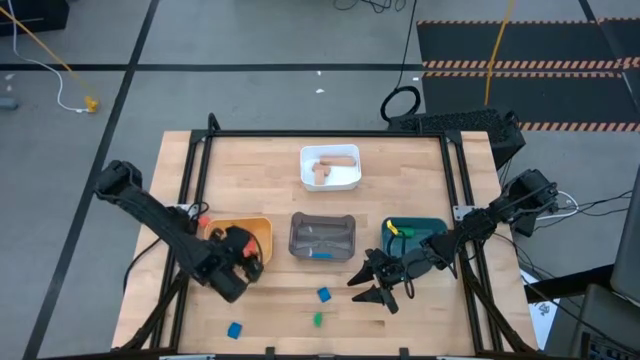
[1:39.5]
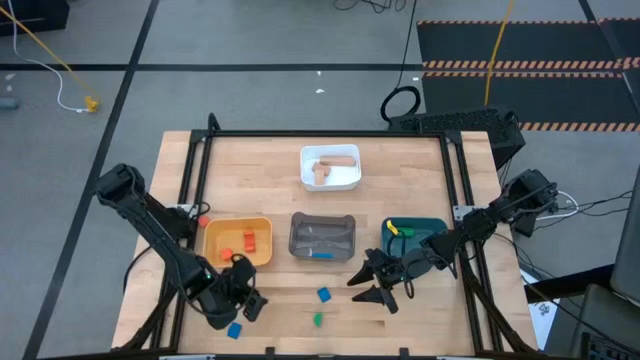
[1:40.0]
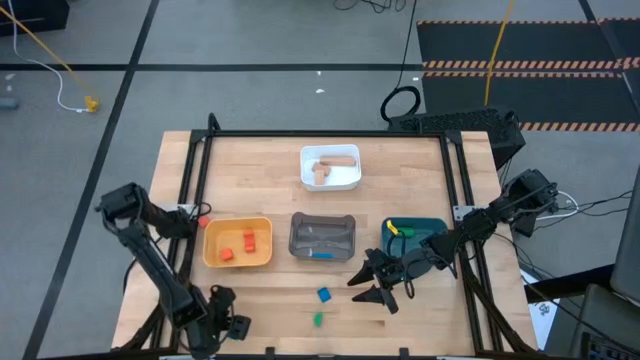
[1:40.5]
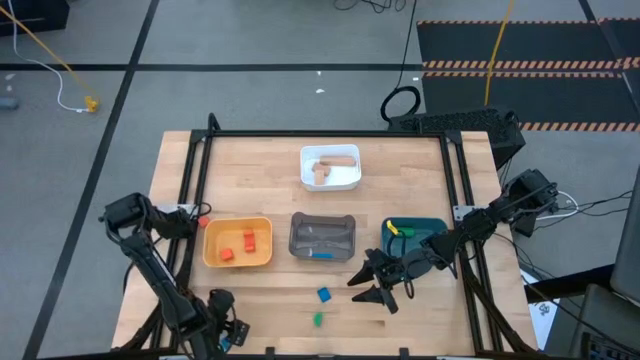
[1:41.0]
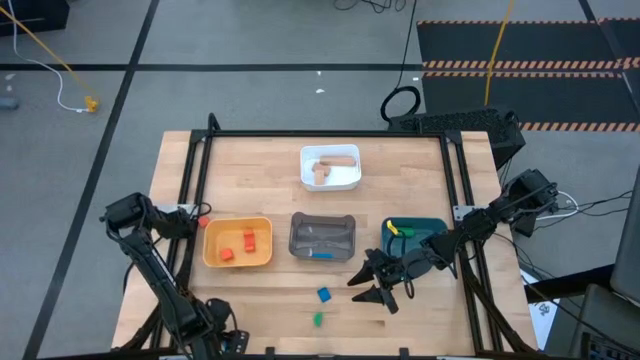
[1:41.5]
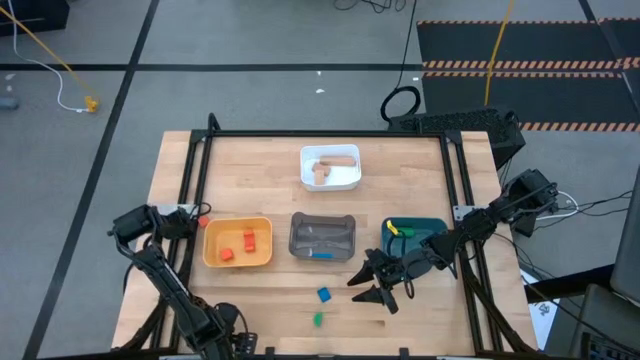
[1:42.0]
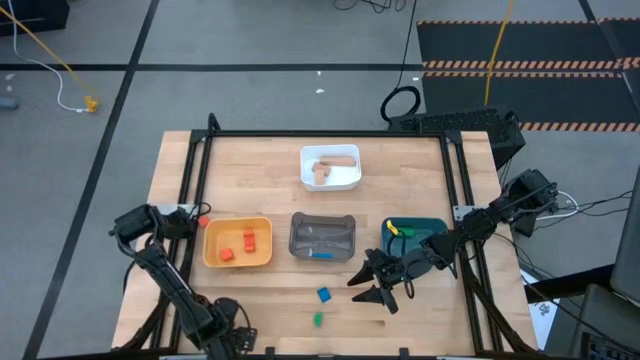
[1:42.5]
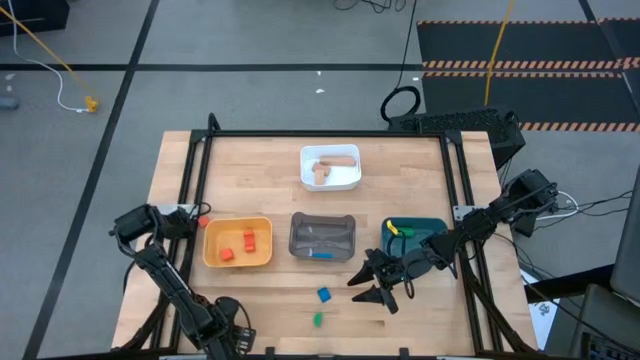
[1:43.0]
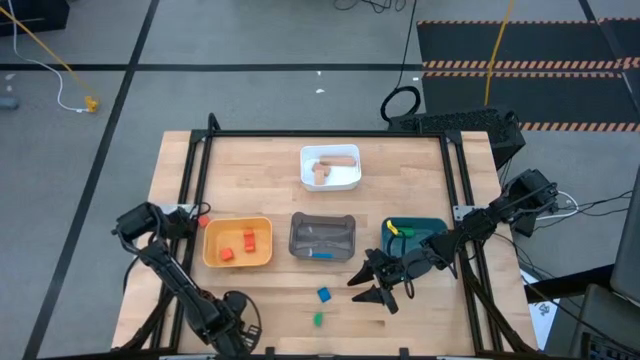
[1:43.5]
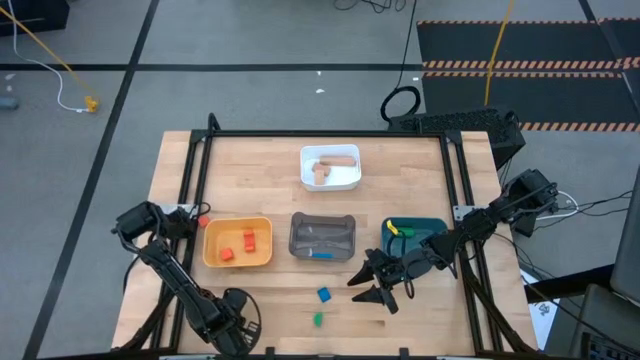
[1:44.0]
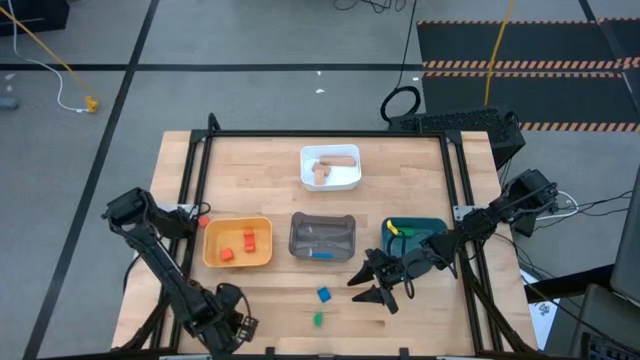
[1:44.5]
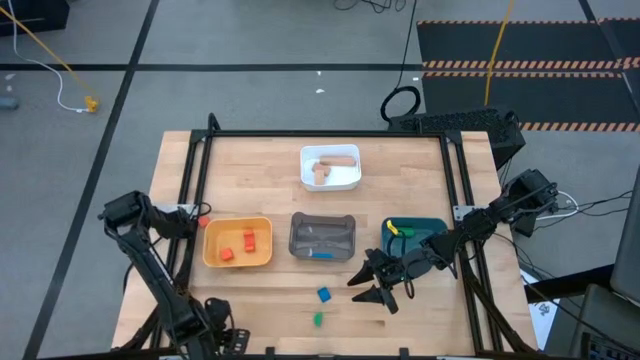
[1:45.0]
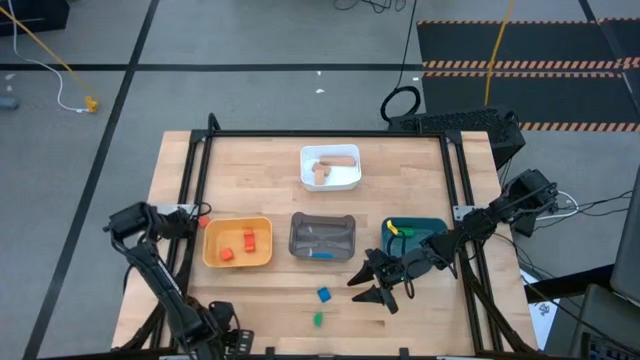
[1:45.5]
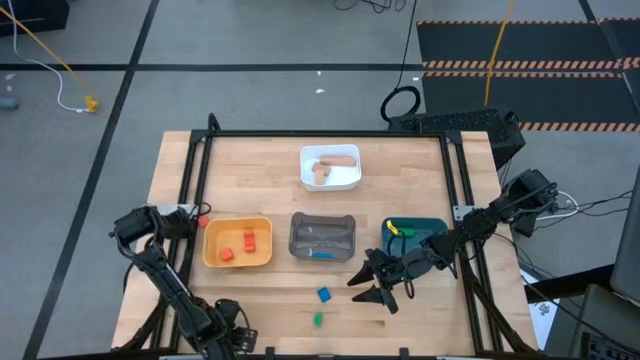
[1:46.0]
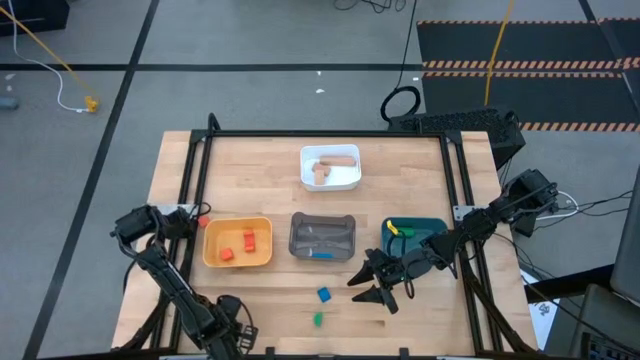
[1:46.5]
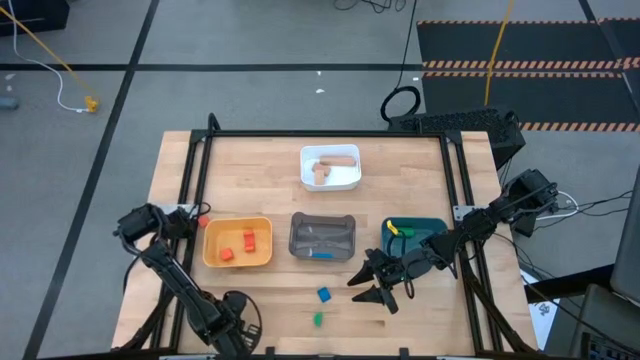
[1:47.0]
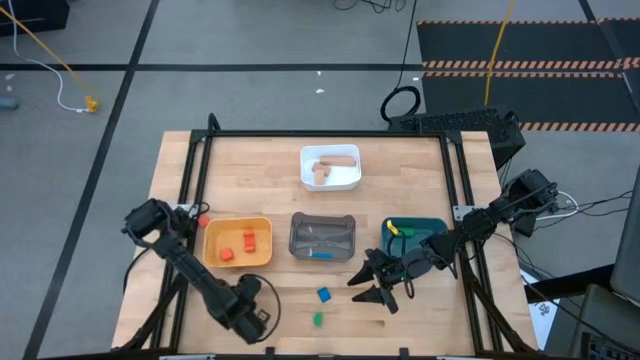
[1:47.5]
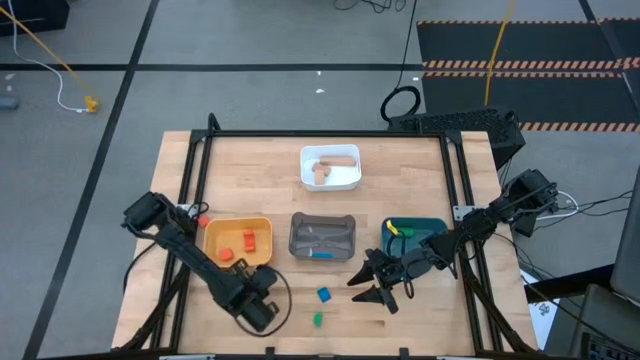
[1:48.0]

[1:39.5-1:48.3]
Task: Sort & place blocks by color
Put the left blue triangular block into the black bin

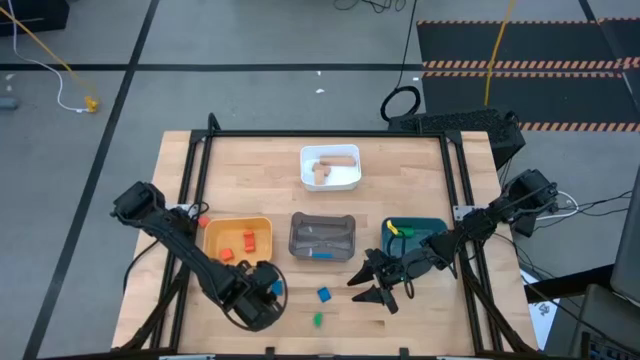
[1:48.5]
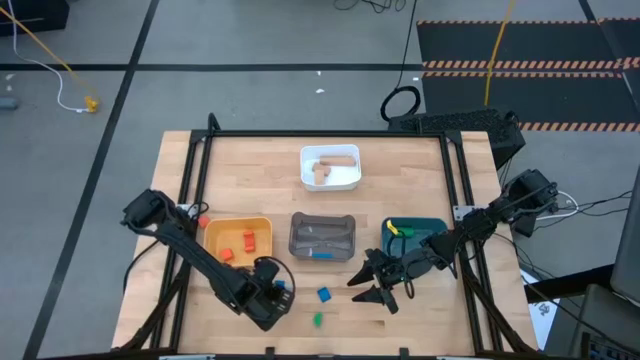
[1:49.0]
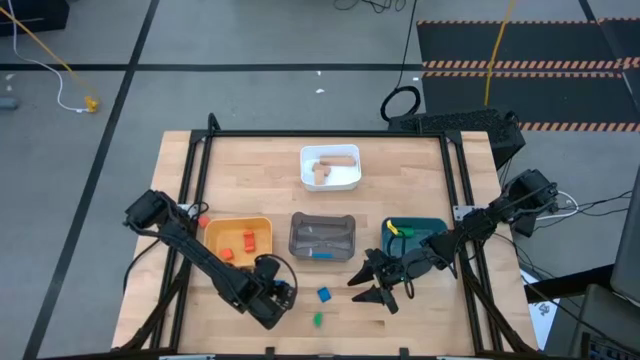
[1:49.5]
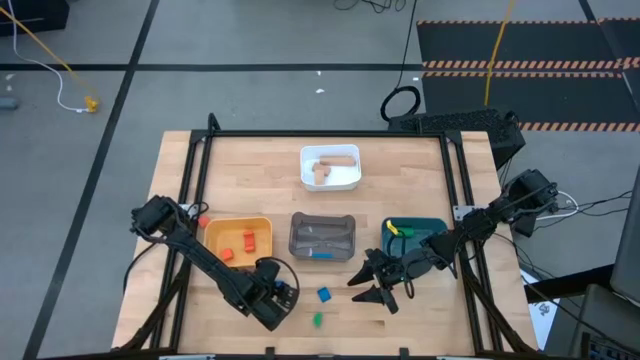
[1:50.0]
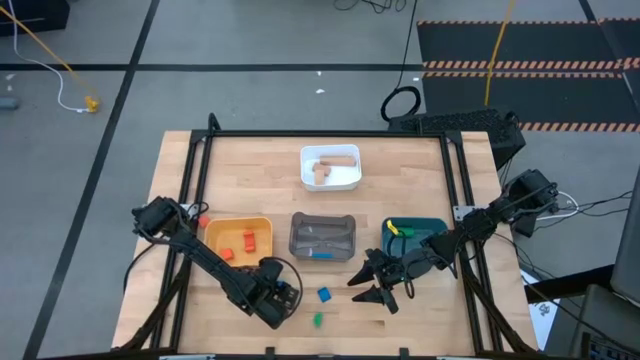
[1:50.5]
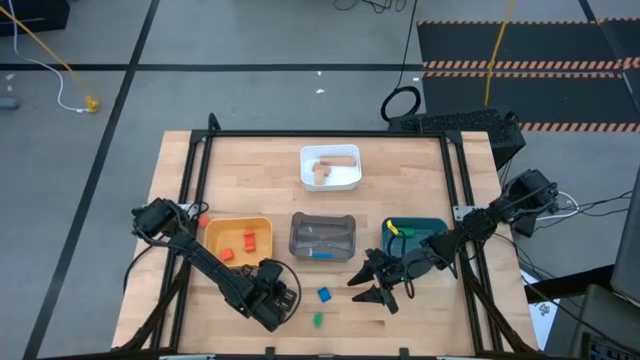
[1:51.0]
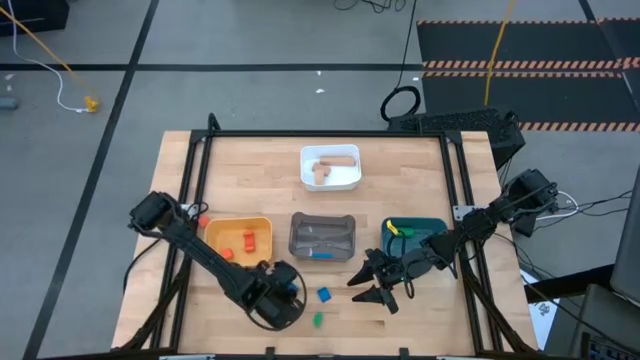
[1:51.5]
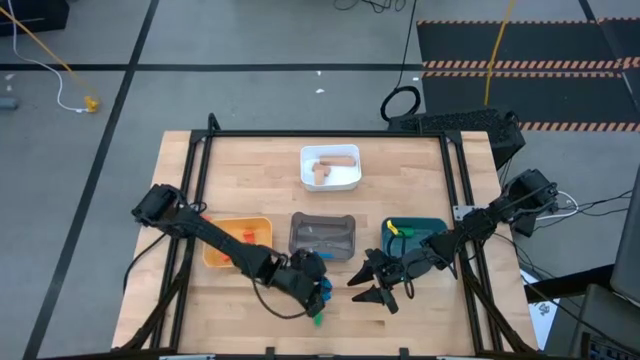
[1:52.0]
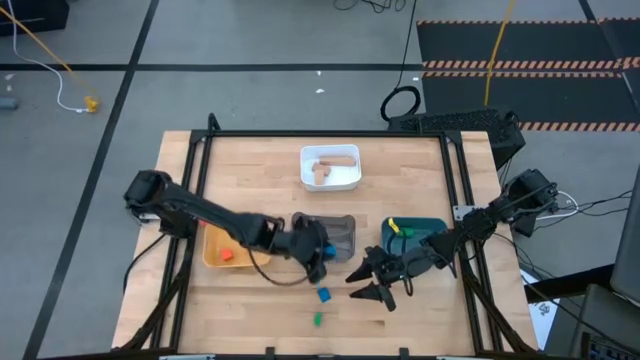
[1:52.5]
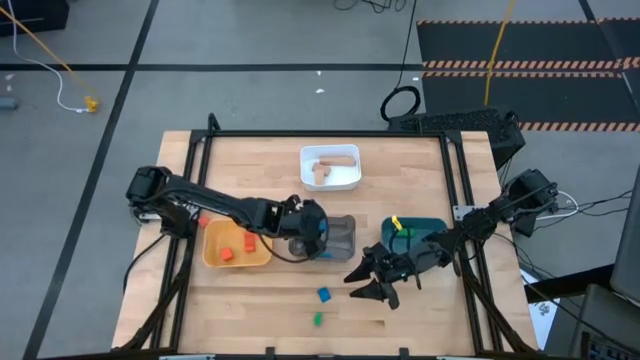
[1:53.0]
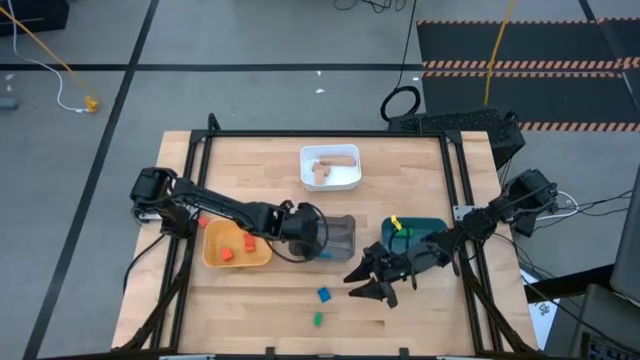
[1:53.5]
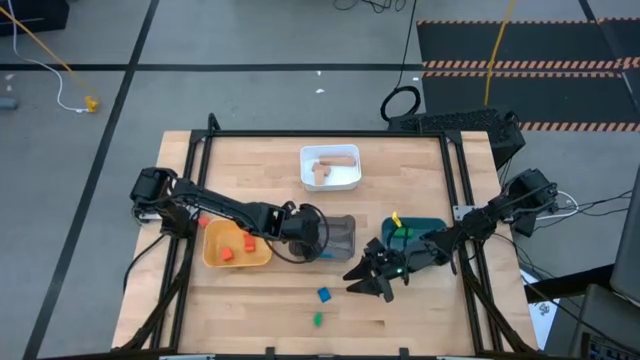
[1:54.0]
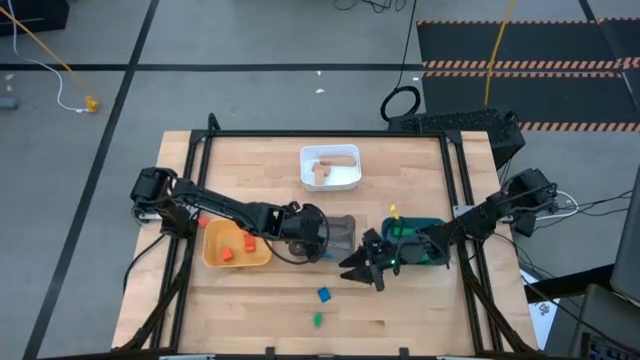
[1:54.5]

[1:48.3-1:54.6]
Put the left blue triangular block into the black bin

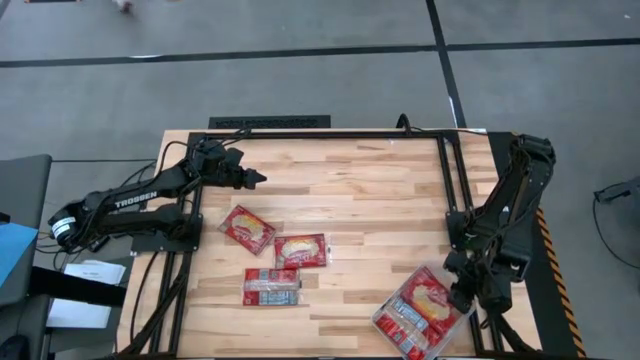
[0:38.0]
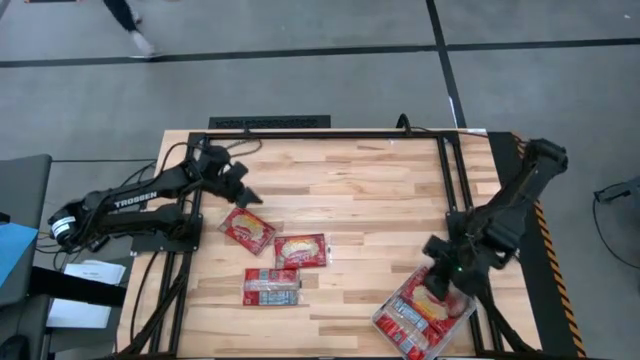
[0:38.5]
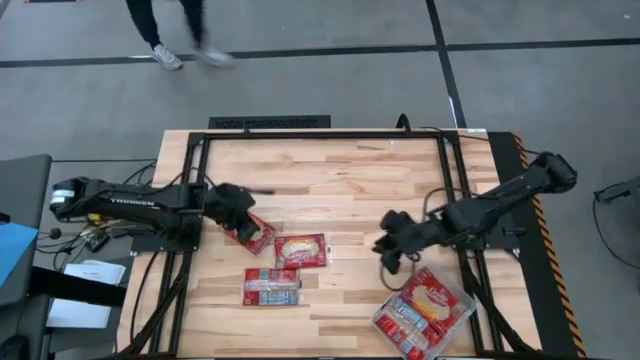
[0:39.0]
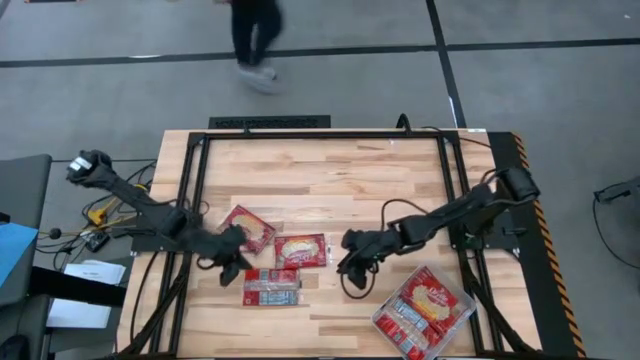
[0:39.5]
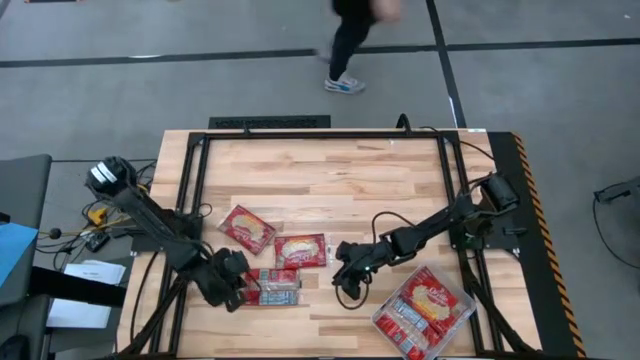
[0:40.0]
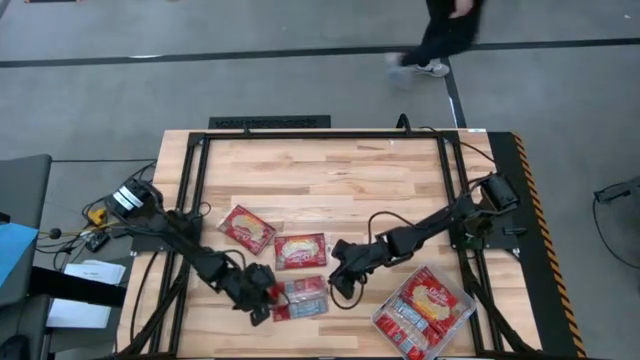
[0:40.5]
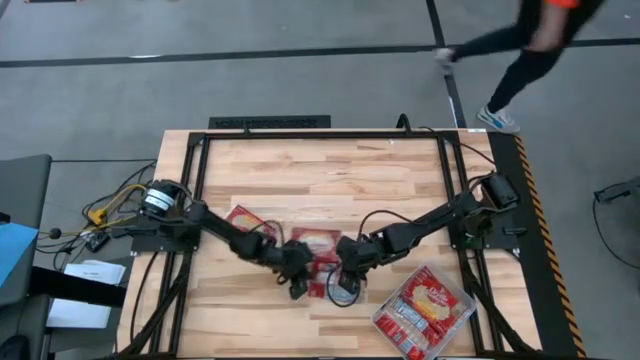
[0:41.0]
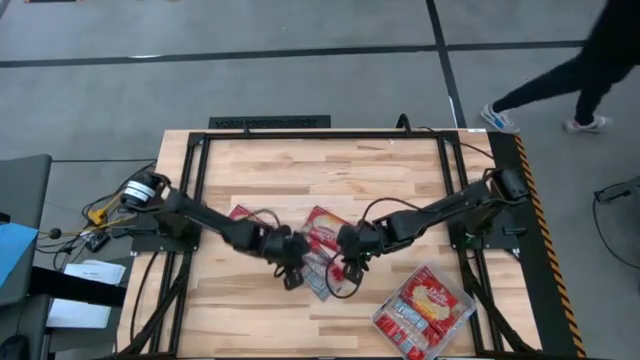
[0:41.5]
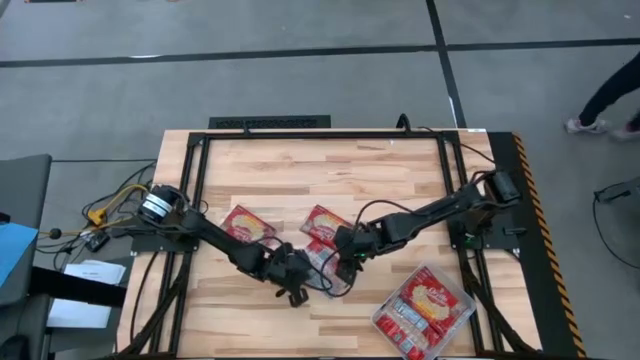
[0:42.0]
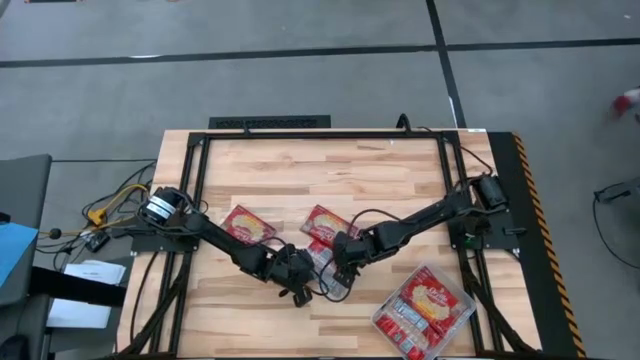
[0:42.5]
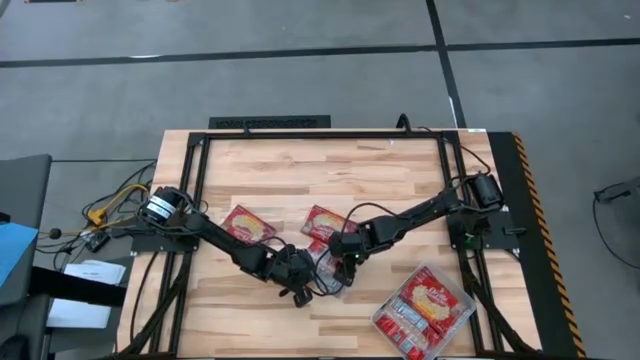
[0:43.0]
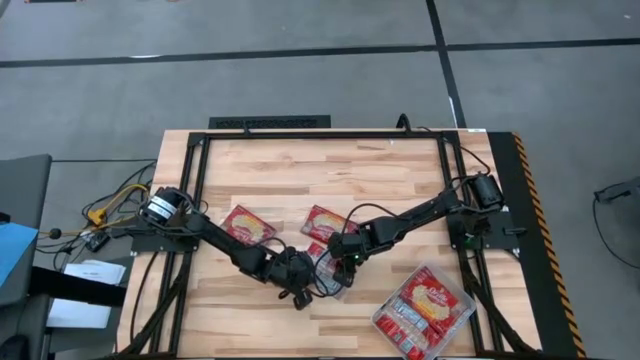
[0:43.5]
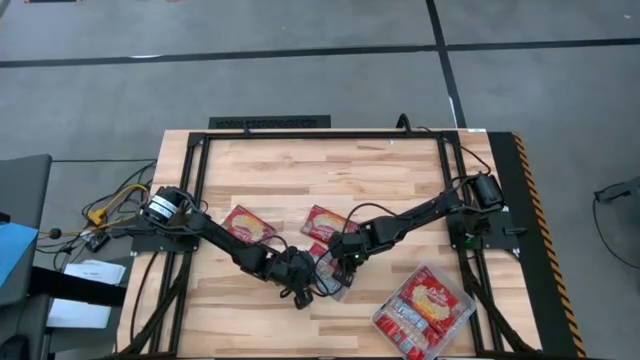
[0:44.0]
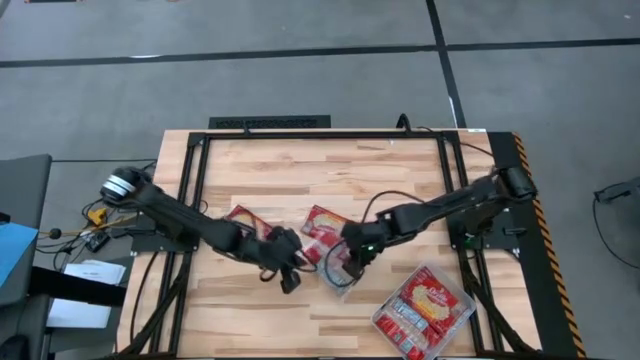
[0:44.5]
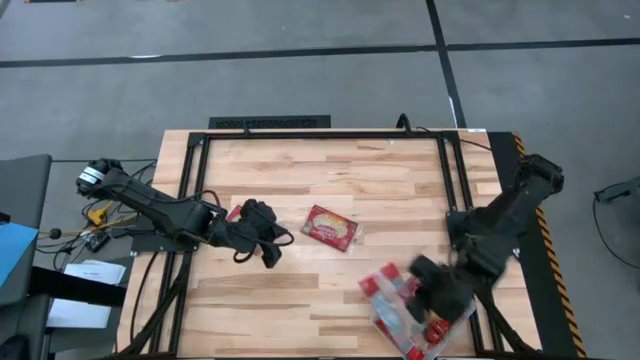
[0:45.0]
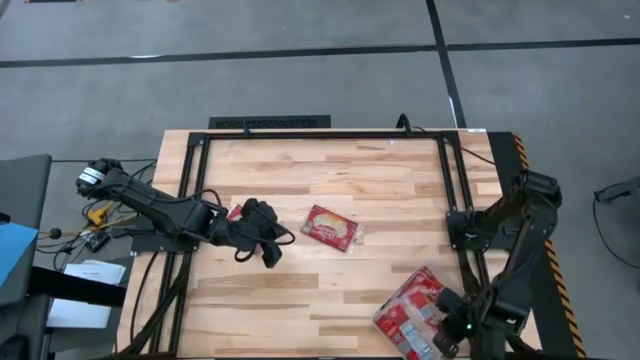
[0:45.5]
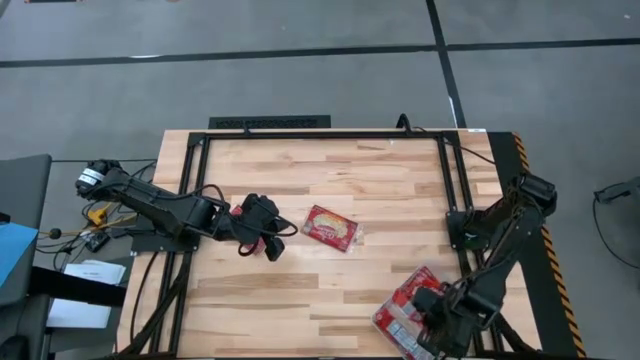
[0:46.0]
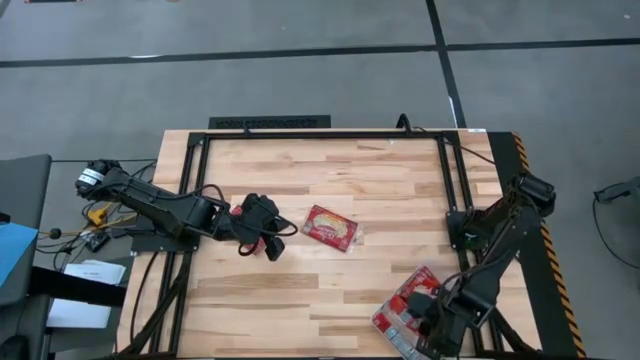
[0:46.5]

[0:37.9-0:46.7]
Task: Sort popcorn bags into baskets
Put the red popcorn bag into the transparent bin
